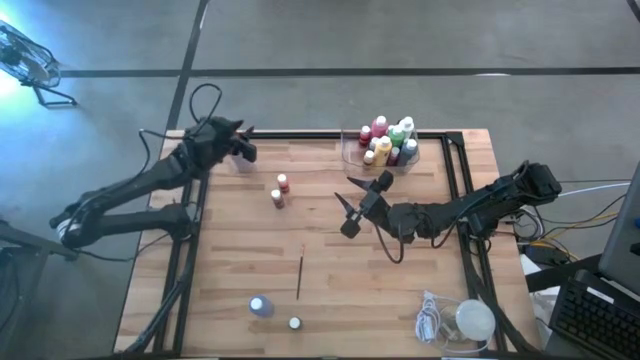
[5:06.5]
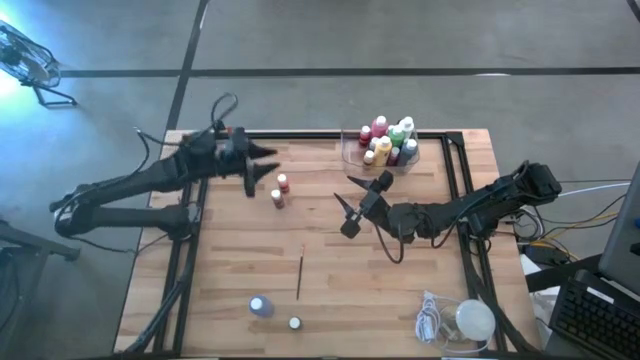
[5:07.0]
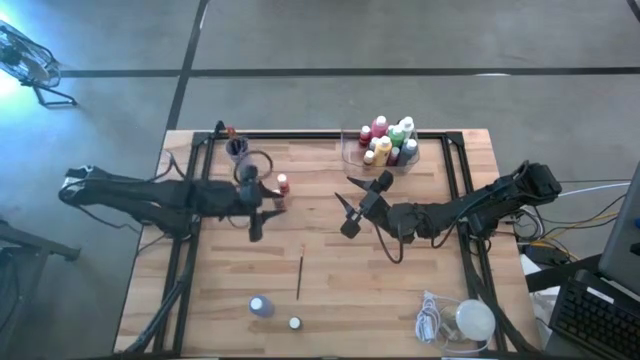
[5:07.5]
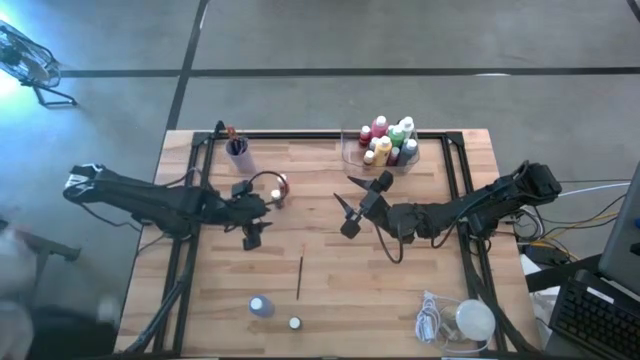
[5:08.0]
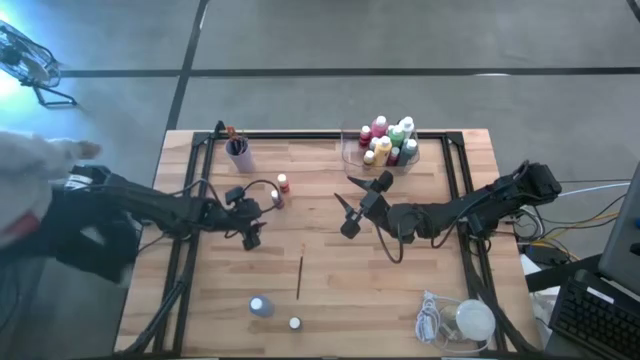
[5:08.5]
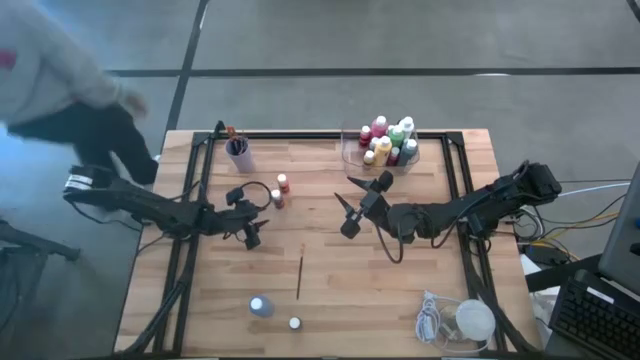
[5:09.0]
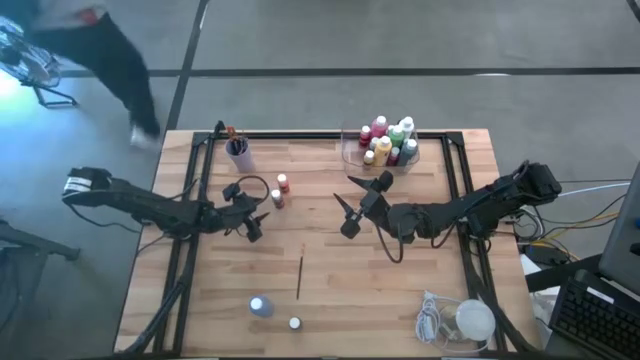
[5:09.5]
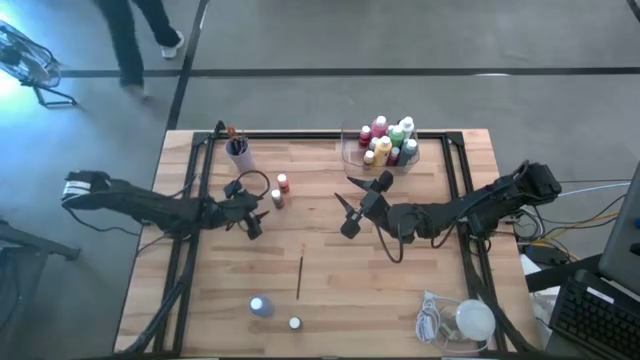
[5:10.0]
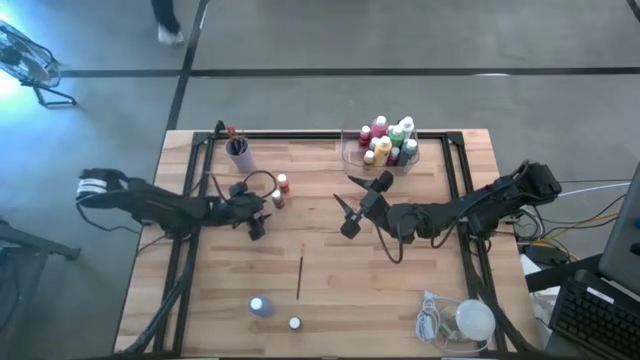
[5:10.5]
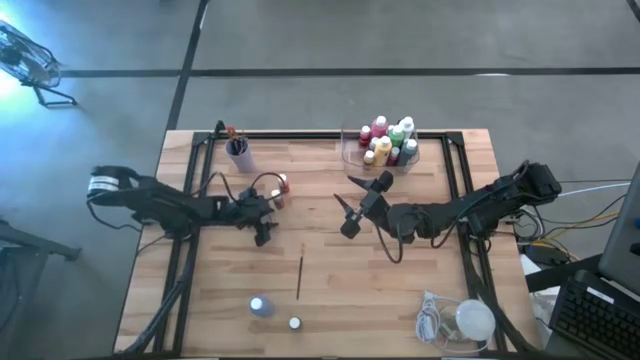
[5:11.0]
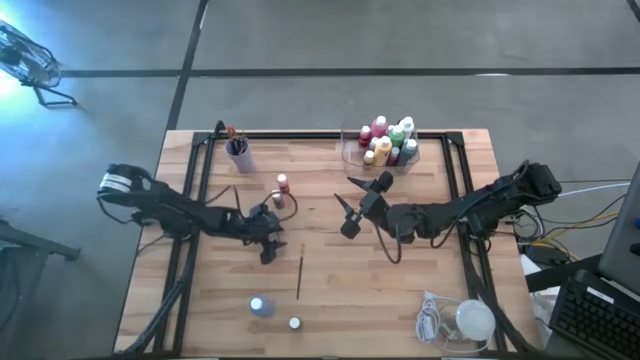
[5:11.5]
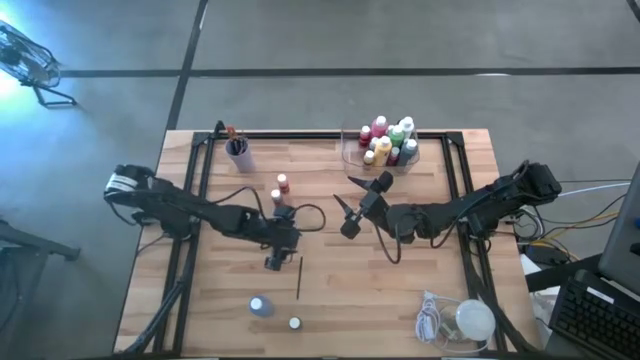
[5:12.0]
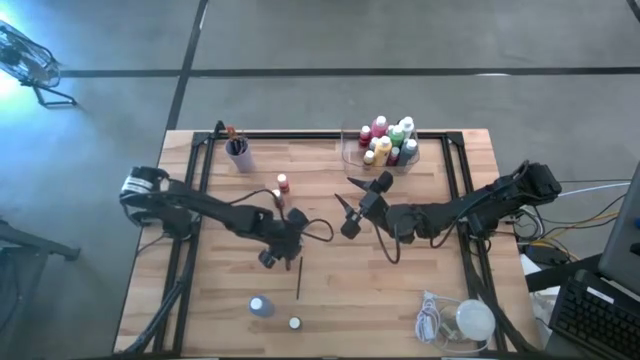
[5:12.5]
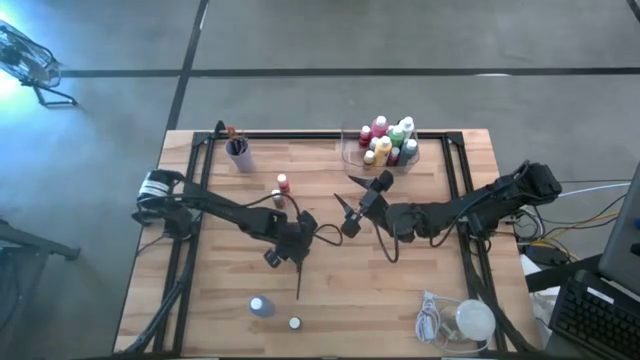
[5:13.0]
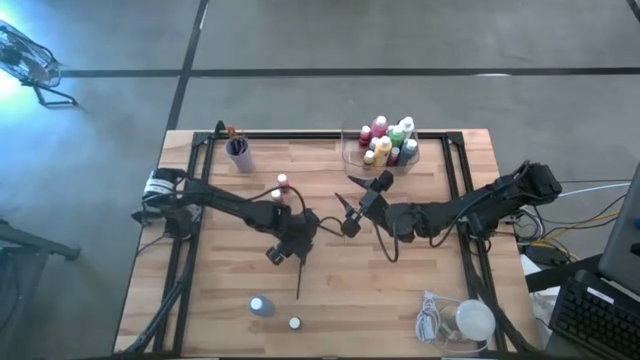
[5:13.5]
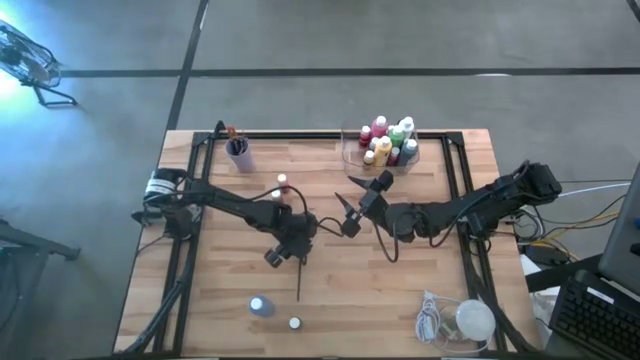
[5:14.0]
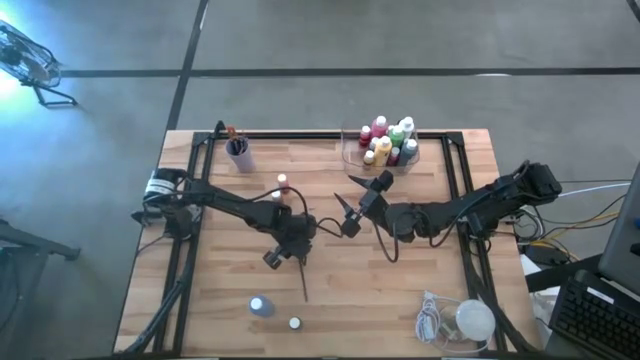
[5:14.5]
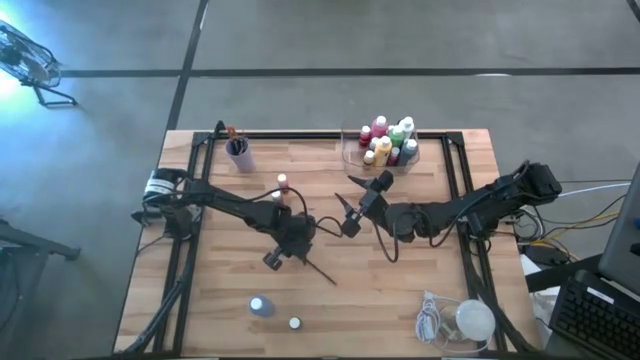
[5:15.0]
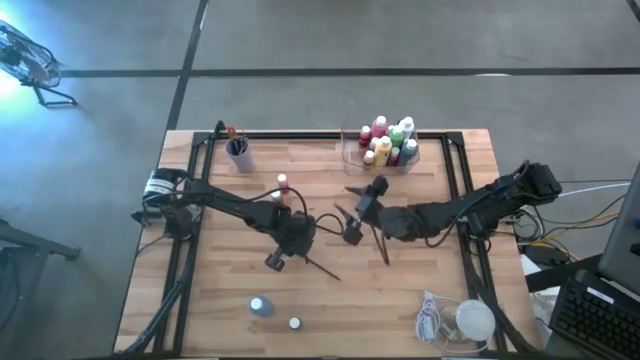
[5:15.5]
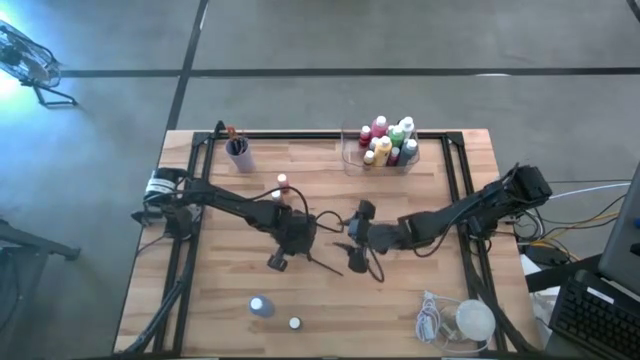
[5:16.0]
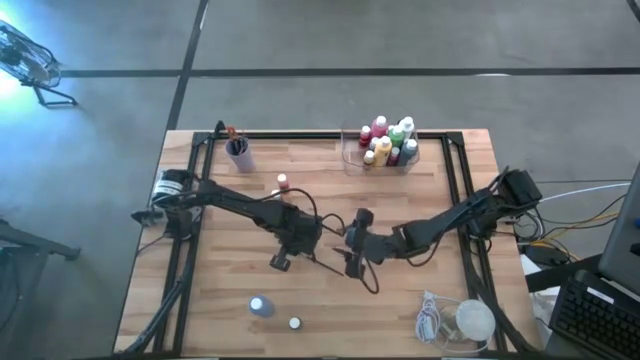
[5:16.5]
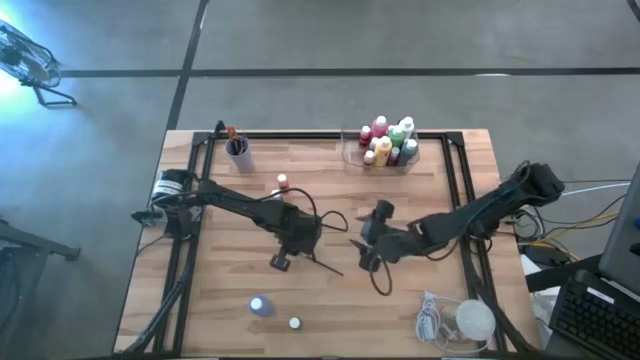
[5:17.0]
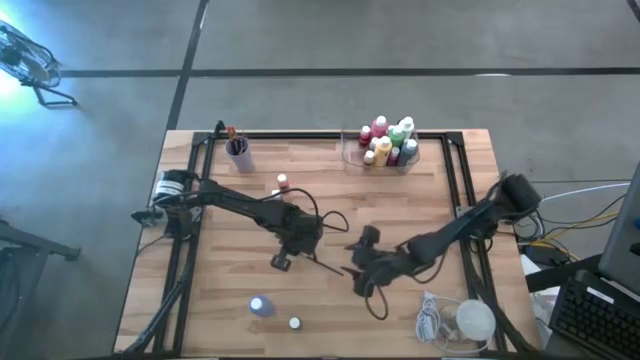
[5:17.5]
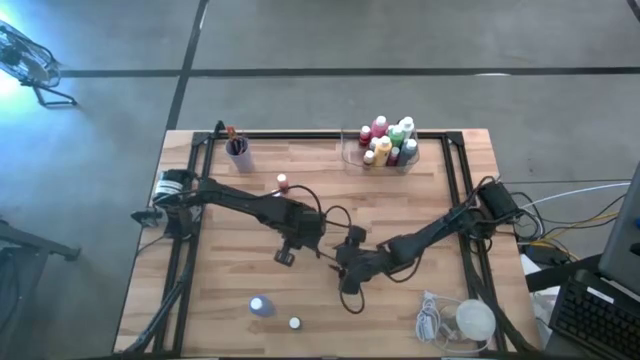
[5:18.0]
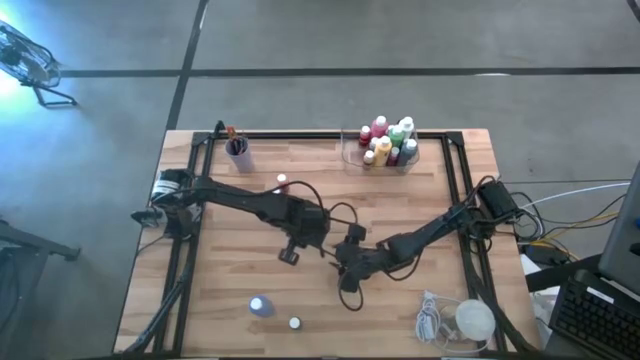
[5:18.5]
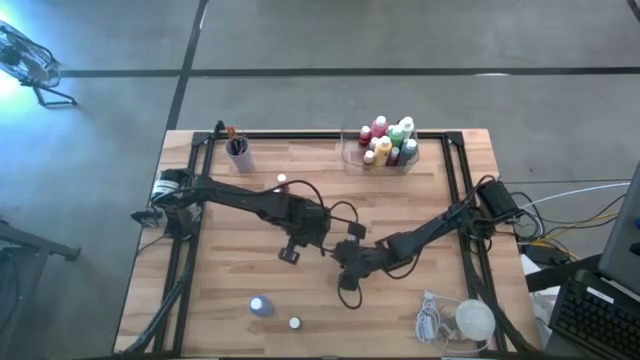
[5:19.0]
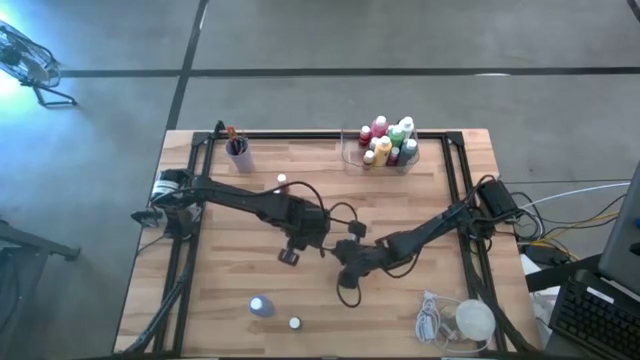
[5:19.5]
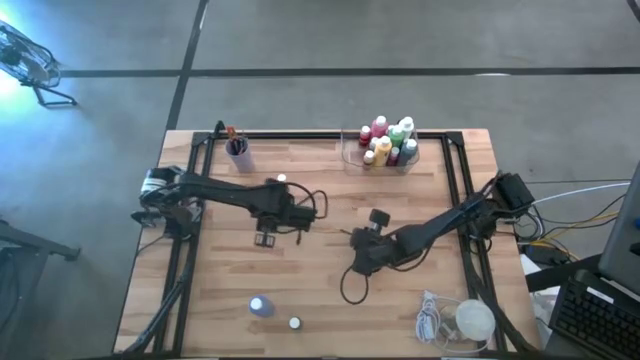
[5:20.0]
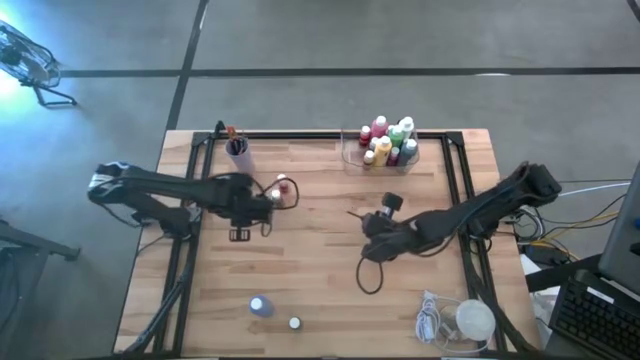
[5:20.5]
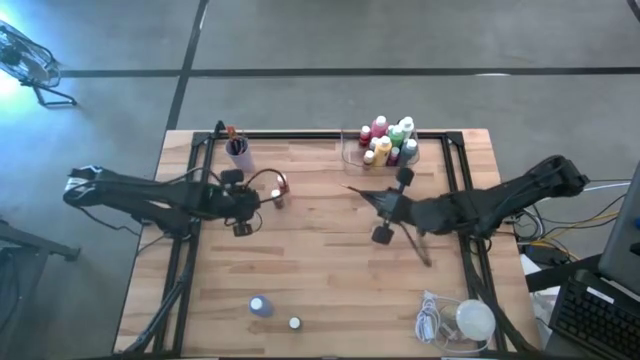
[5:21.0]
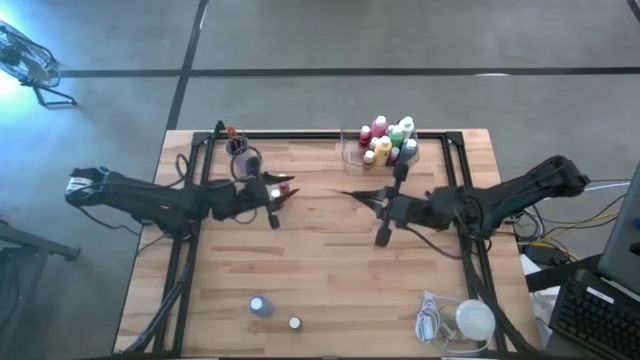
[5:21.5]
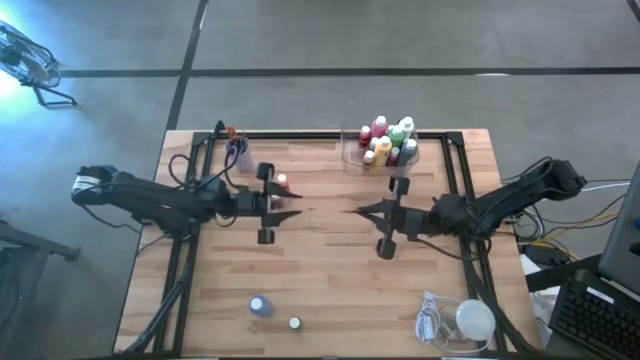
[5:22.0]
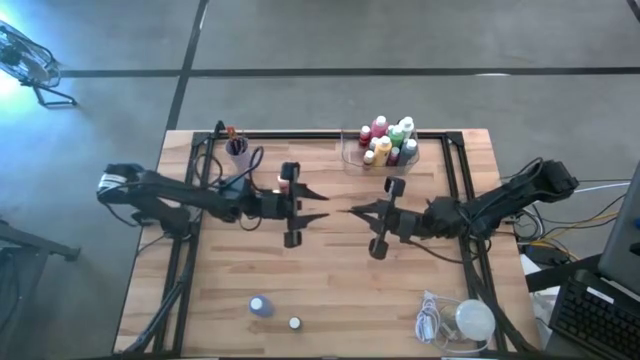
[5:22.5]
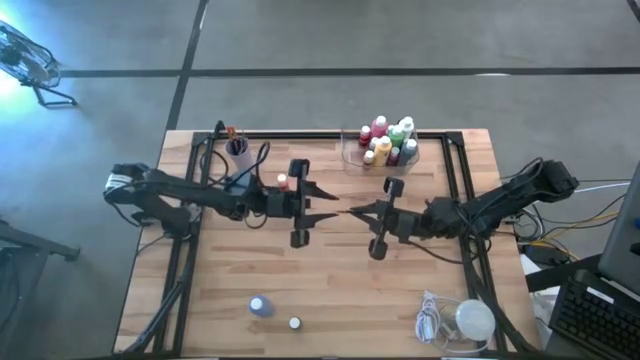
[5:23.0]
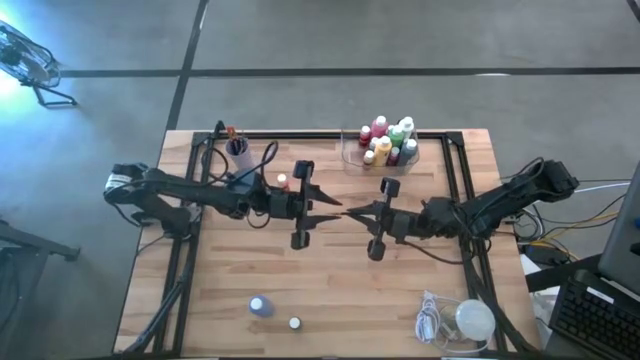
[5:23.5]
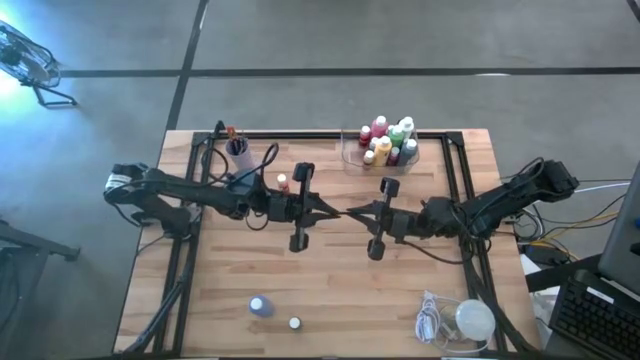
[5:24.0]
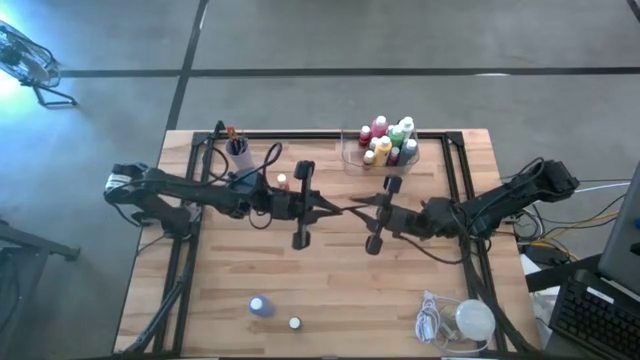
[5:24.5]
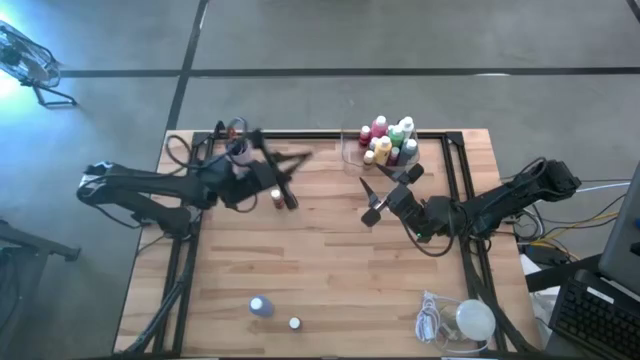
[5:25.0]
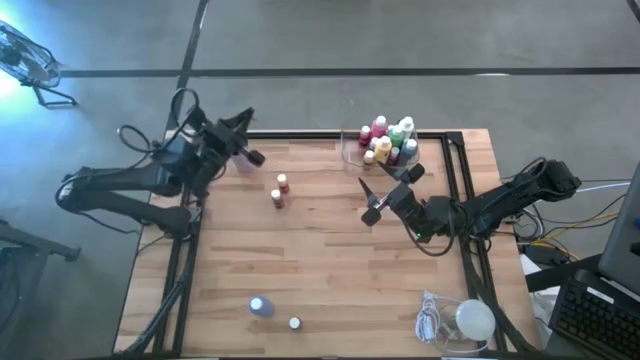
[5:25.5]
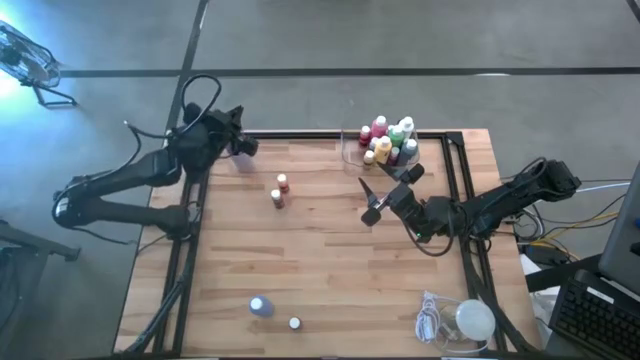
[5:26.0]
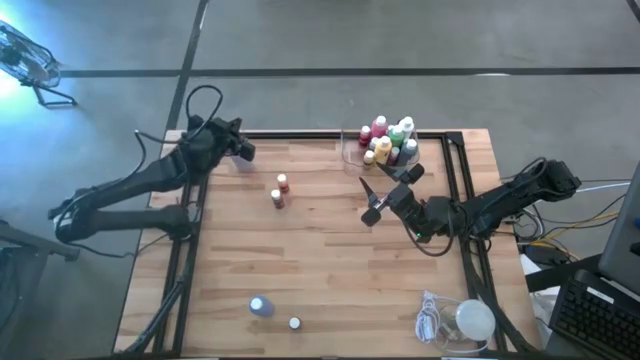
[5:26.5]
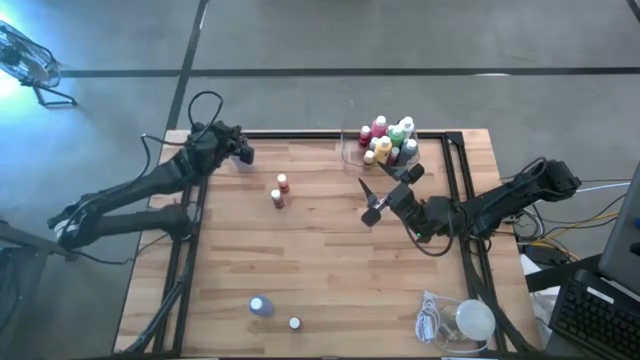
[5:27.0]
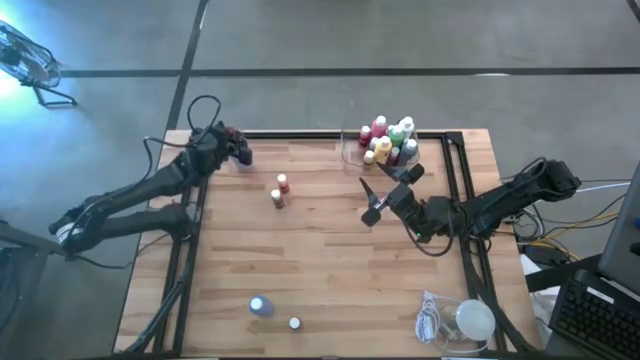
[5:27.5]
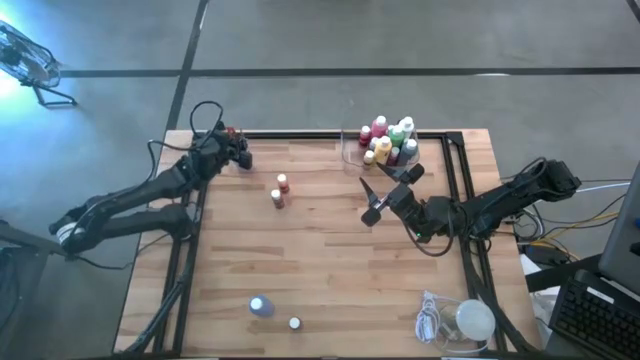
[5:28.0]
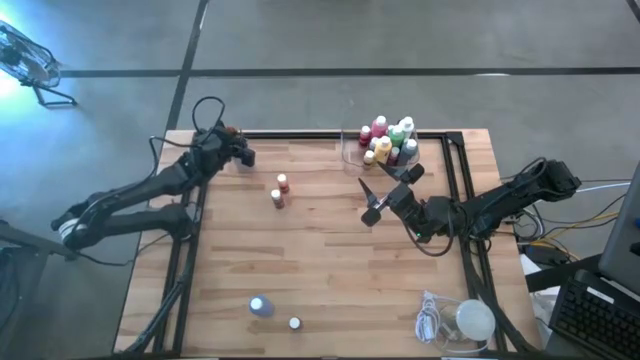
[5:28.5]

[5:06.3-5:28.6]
Task: Pick & Place Paint Supplies
Put the gold paint brush into the violet cup
